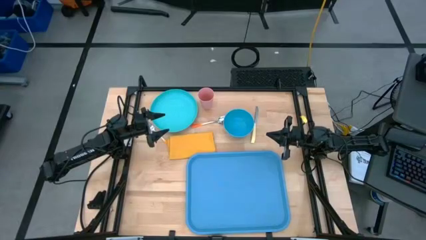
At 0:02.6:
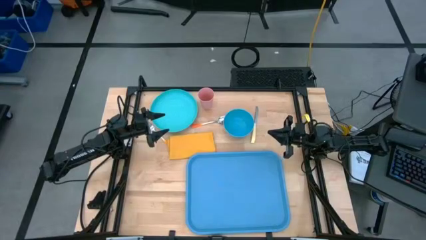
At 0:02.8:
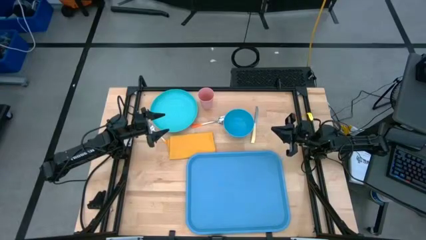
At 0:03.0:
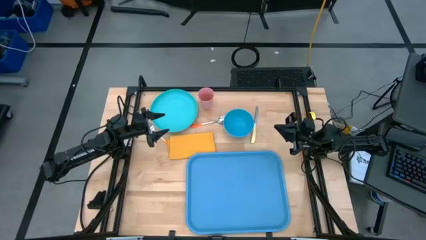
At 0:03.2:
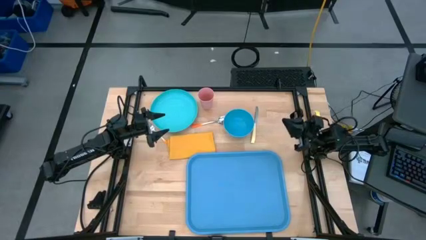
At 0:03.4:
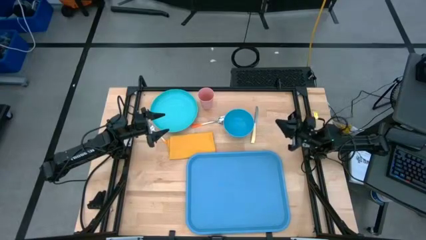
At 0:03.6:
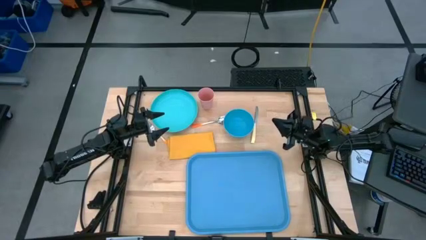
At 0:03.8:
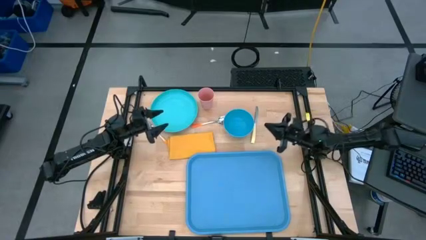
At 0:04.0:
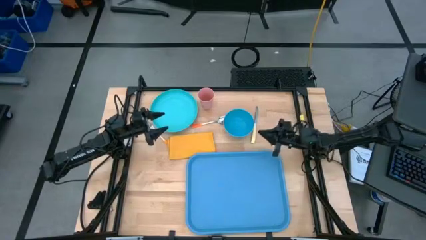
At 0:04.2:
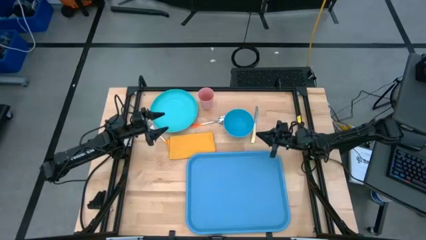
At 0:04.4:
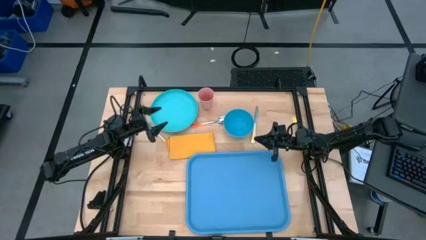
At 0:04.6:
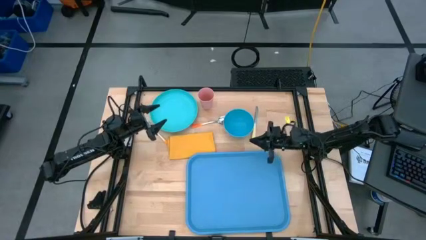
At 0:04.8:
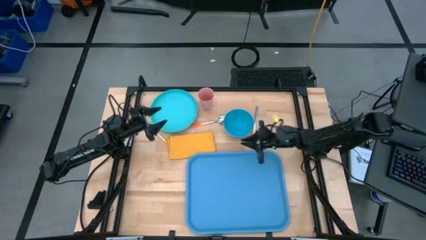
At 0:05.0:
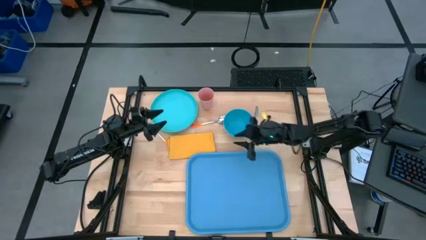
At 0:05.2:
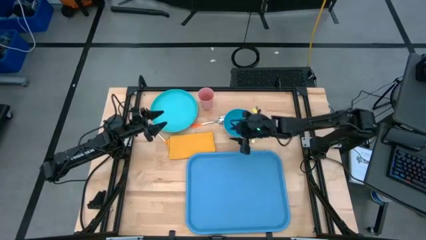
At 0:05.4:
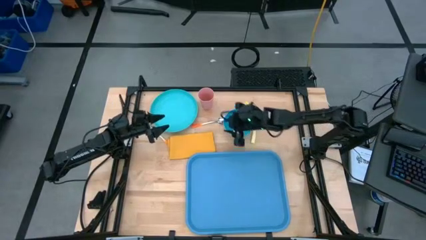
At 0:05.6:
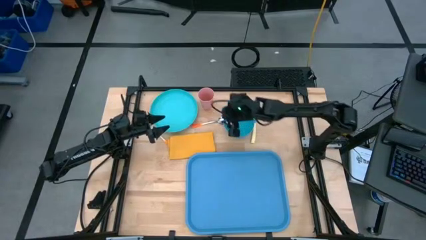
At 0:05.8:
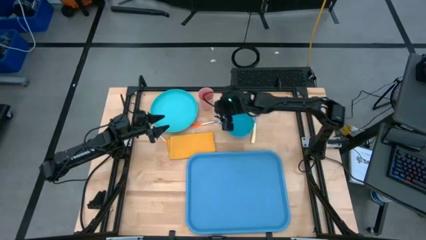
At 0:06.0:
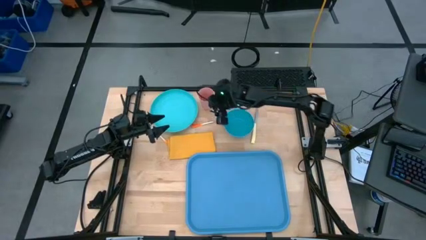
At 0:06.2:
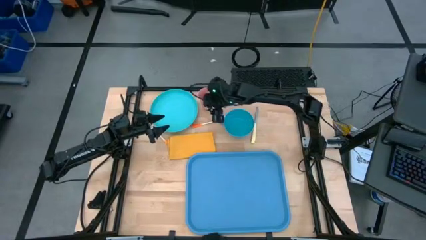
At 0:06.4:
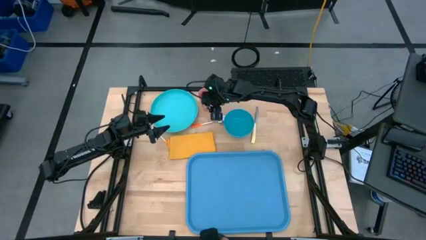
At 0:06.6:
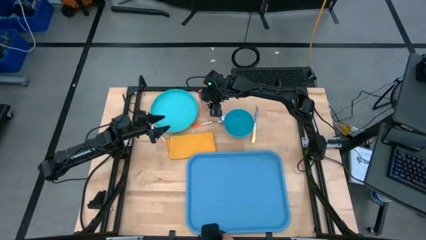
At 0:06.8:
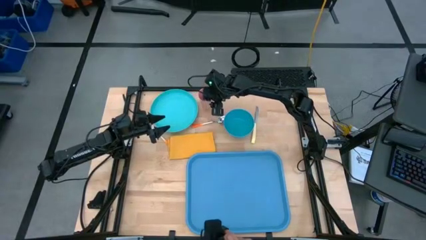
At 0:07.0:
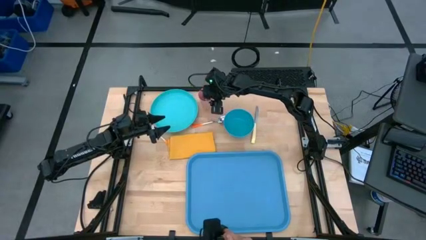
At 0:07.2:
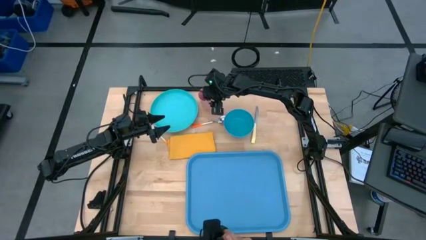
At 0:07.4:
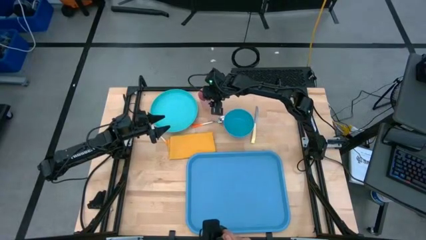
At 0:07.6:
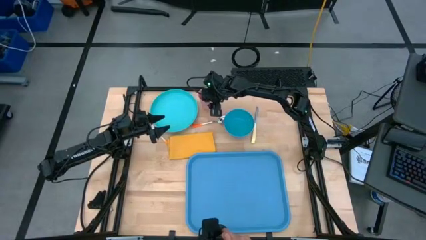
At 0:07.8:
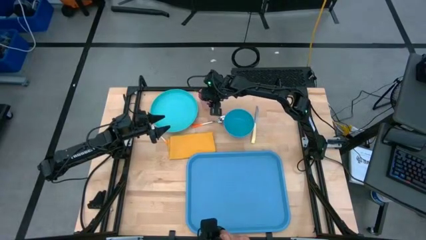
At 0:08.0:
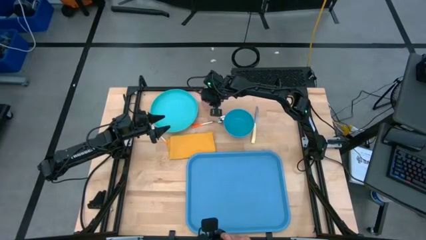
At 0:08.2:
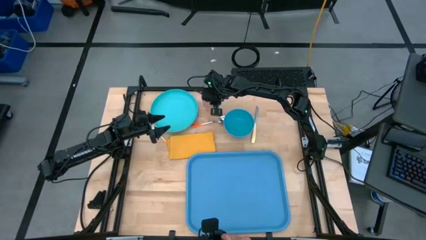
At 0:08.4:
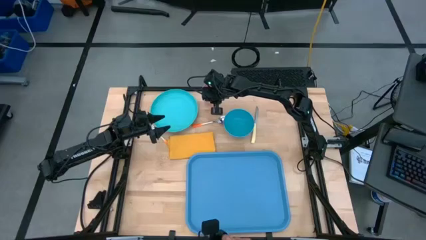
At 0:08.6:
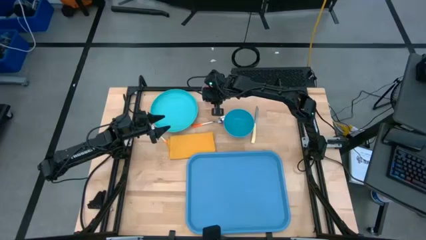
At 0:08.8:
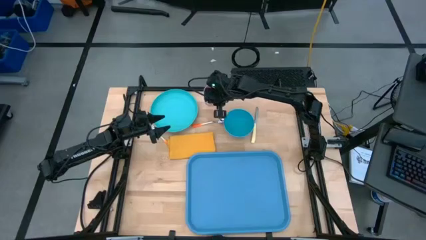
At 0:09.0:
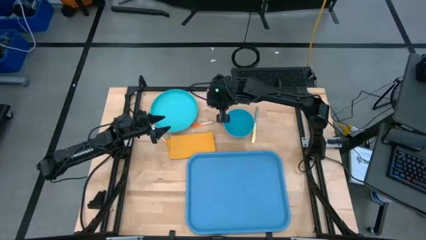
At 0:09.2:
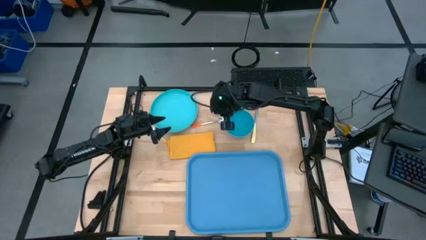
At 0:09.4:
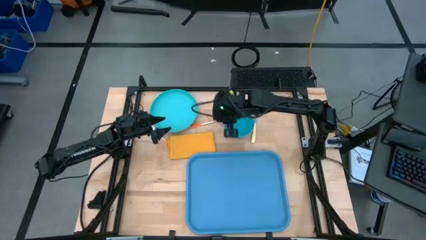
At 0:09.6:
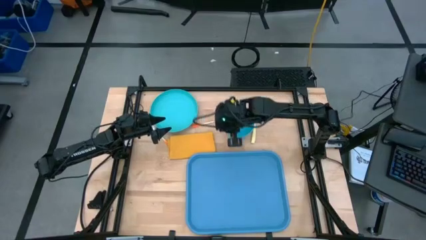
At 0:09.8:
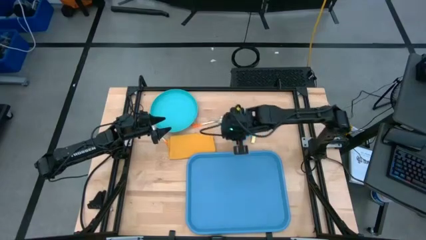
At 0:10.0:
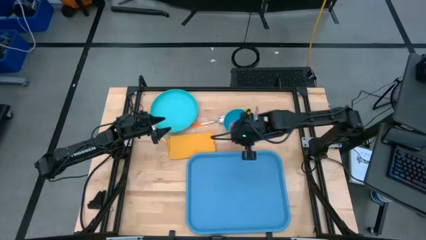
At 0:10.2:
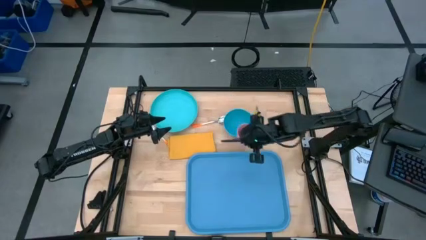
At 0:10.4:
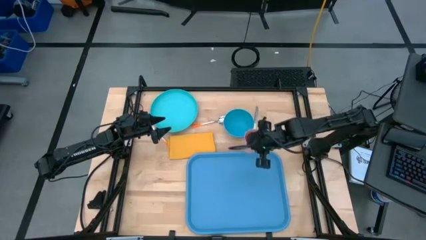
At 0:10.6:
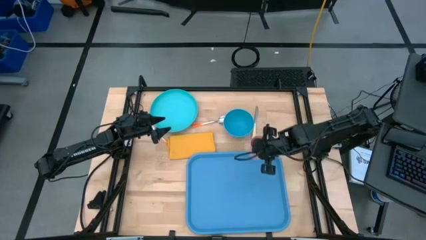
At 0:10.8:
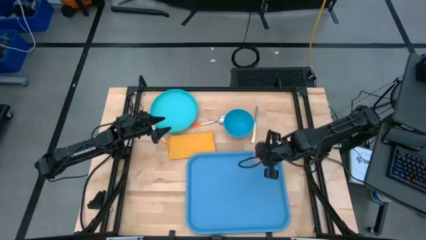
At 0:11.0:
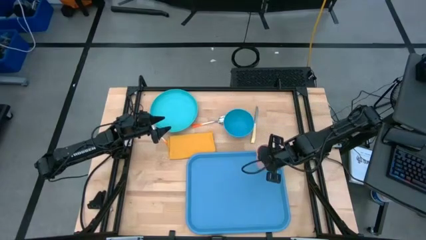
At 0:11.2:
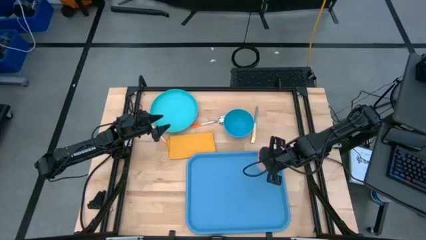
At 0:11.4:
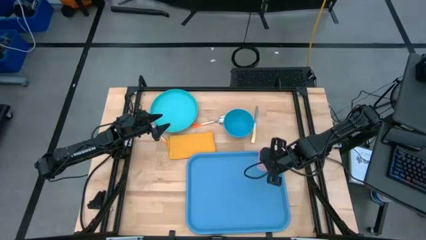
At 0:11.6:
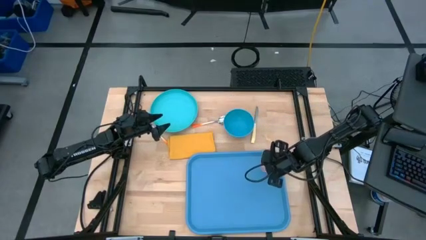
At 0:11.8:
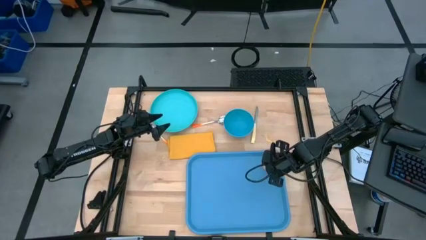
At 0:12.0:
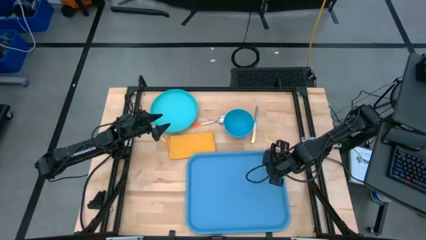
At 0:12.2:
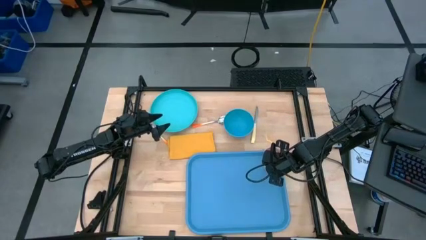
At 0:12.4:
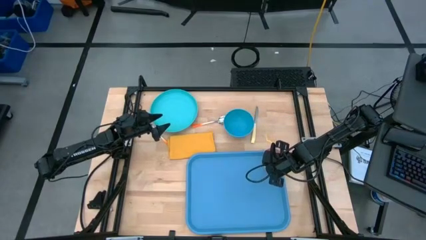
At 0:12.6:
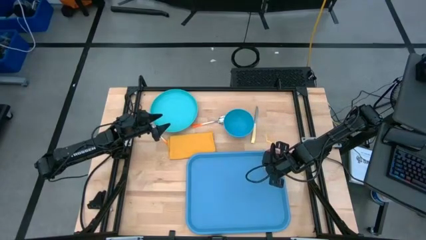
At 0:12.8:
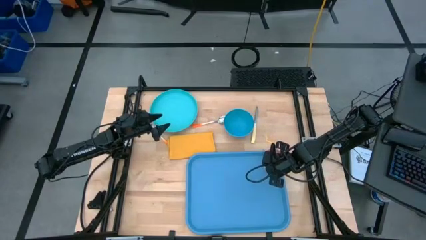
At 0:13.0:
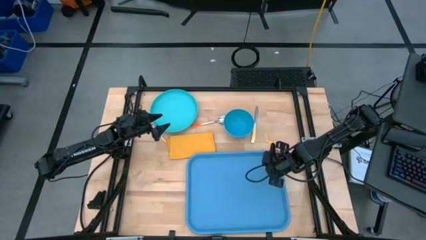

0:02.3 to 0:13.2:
Task: Set up tray
Put the pink cup on the top right of the blue serving tray
